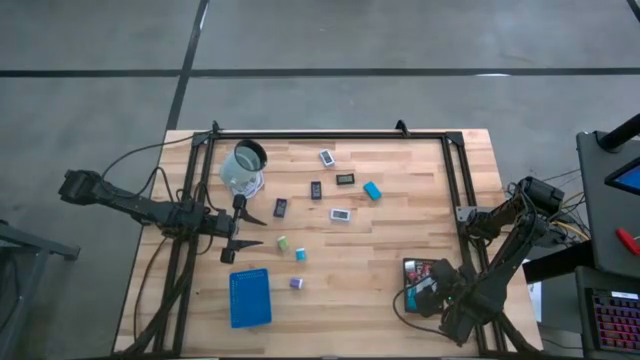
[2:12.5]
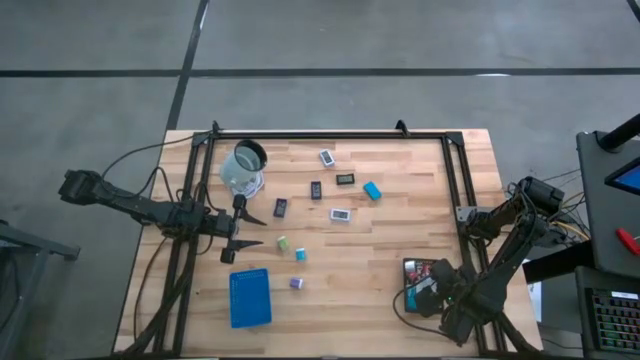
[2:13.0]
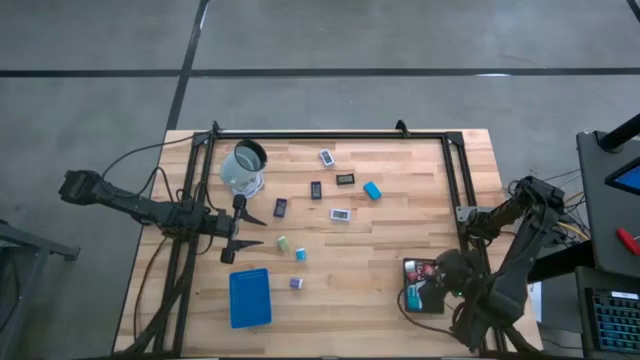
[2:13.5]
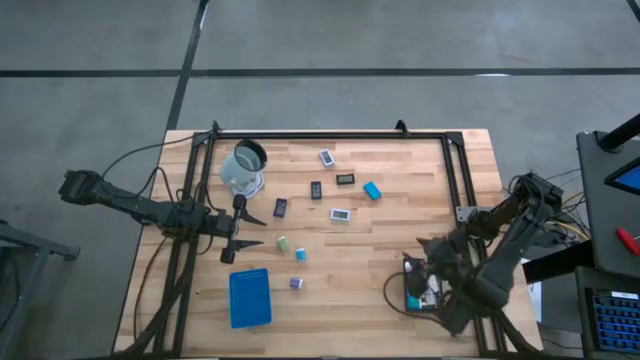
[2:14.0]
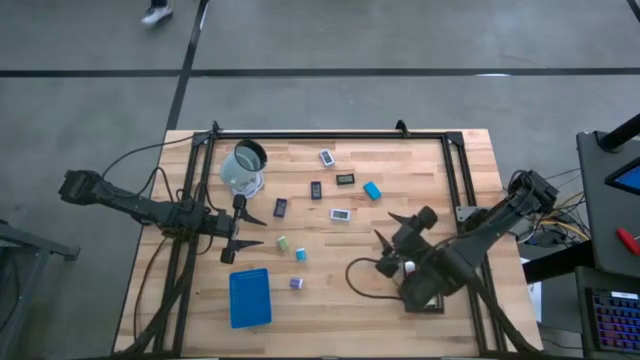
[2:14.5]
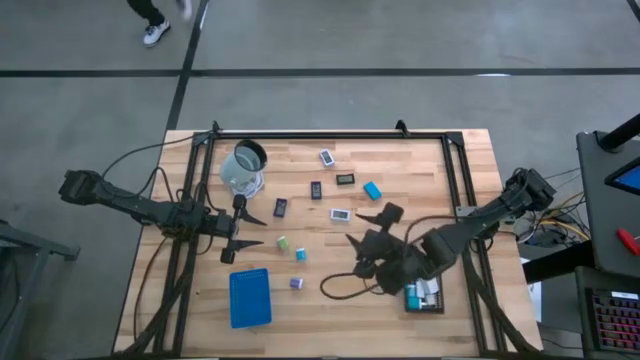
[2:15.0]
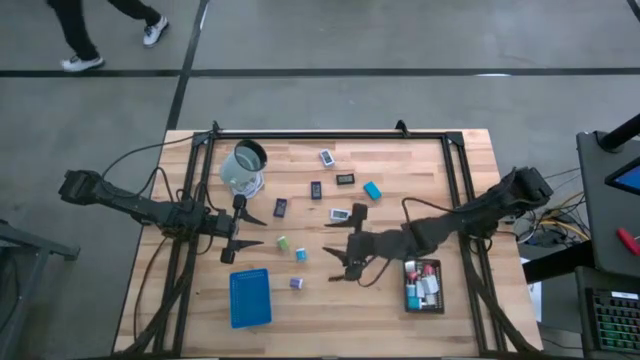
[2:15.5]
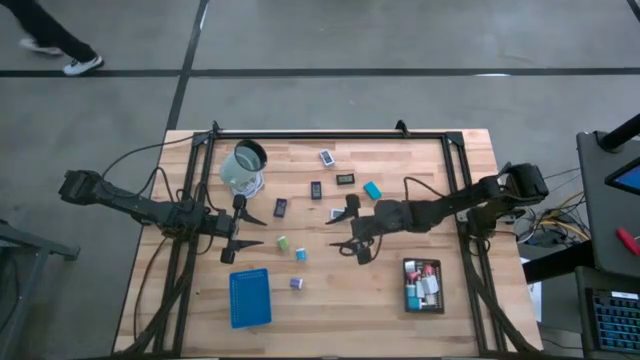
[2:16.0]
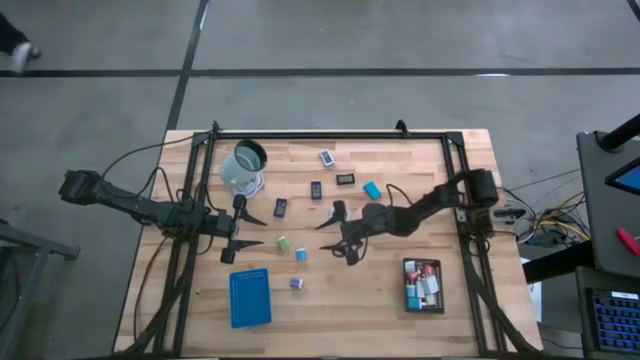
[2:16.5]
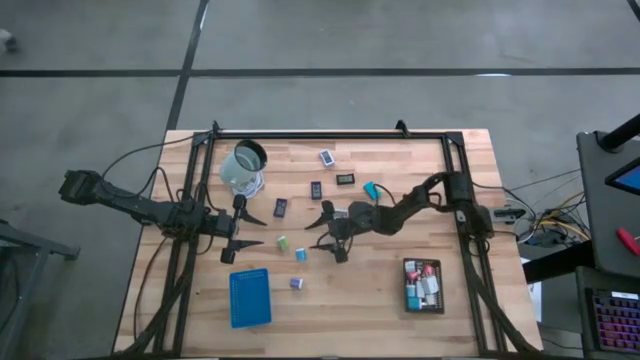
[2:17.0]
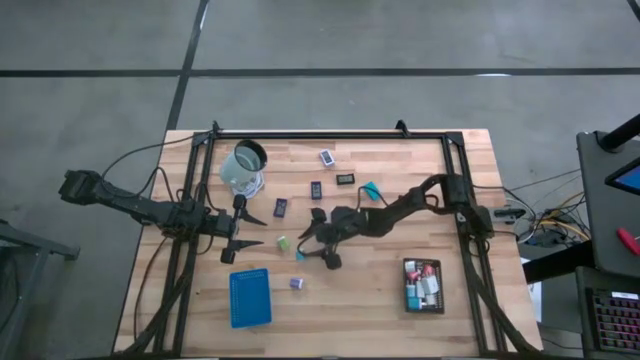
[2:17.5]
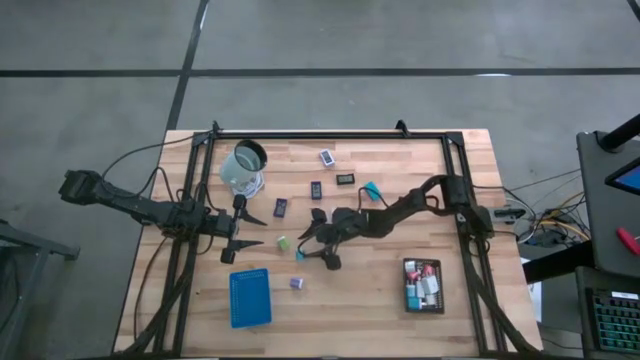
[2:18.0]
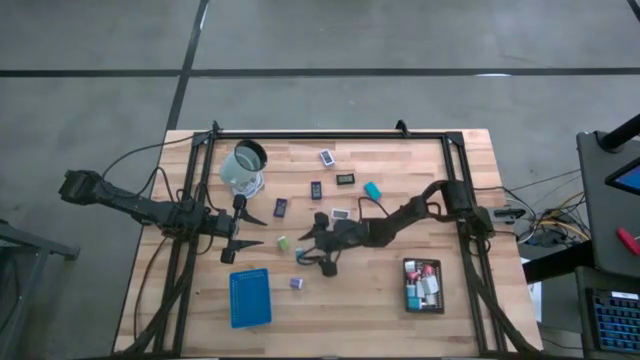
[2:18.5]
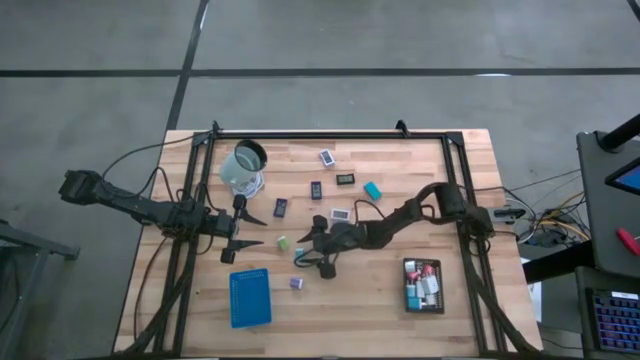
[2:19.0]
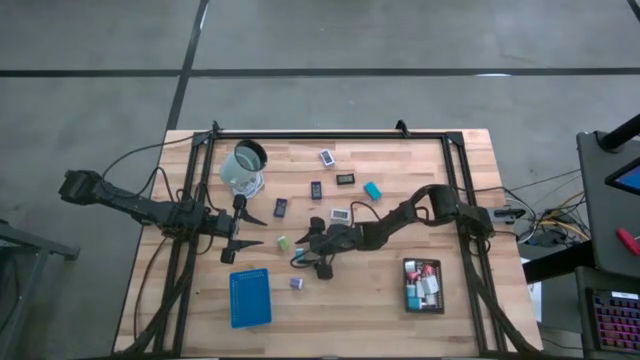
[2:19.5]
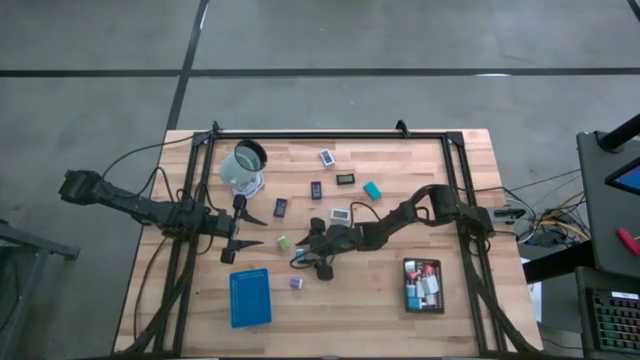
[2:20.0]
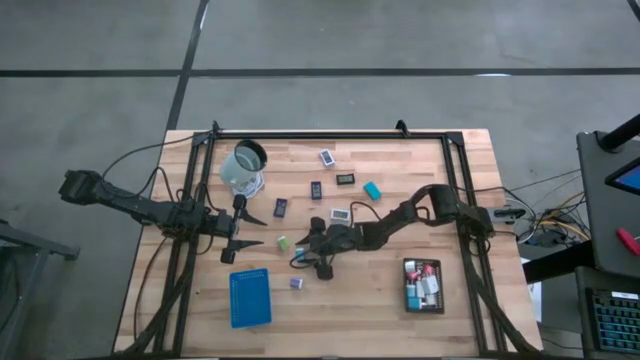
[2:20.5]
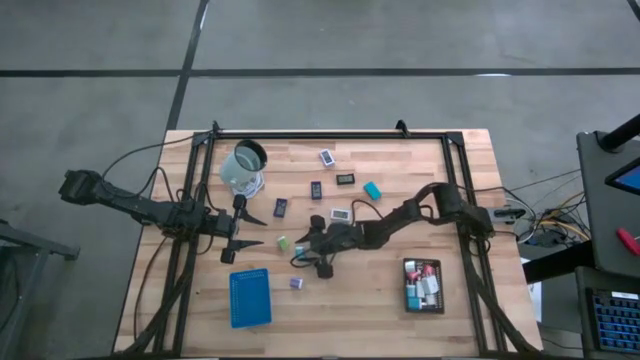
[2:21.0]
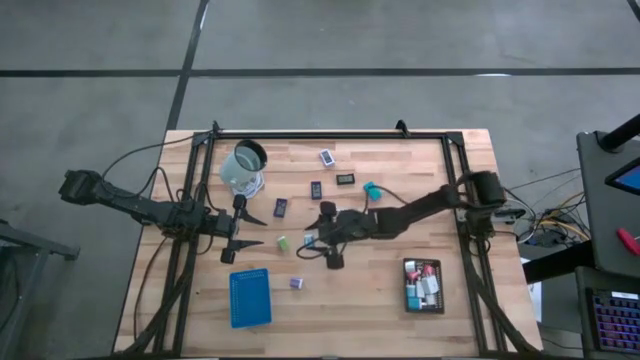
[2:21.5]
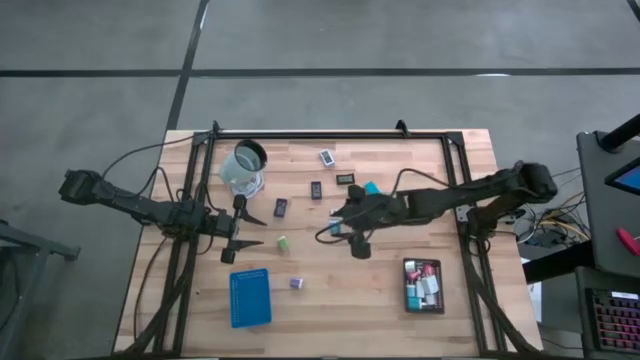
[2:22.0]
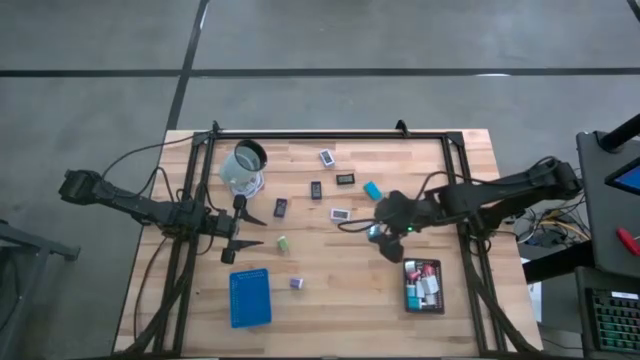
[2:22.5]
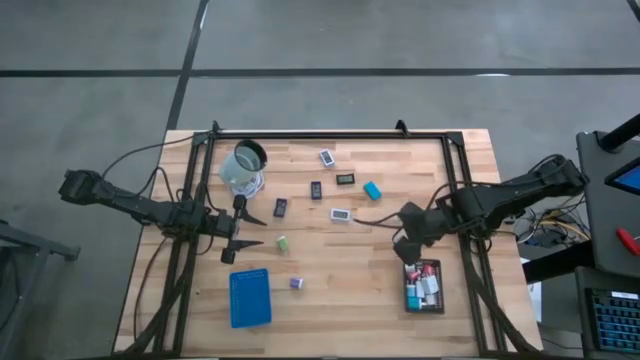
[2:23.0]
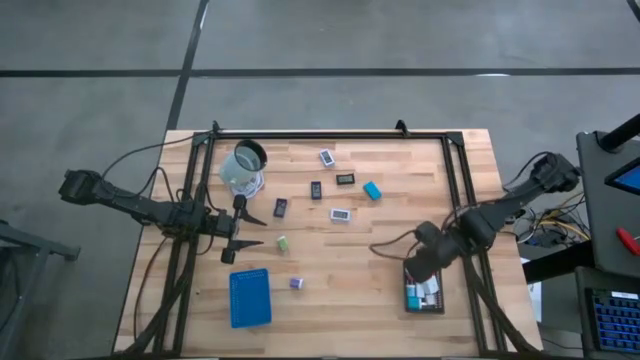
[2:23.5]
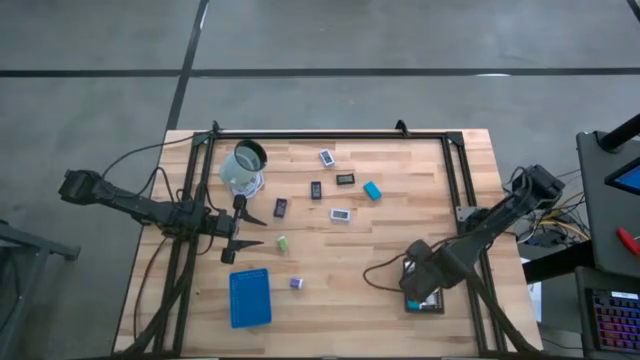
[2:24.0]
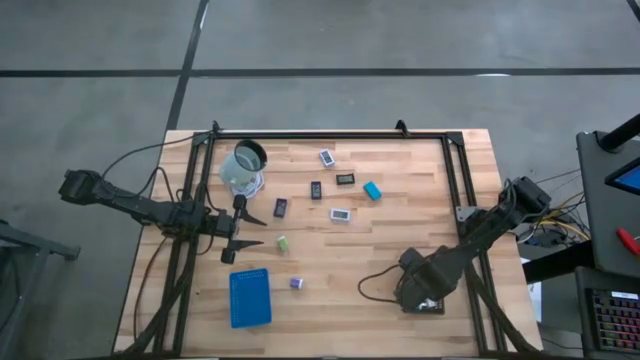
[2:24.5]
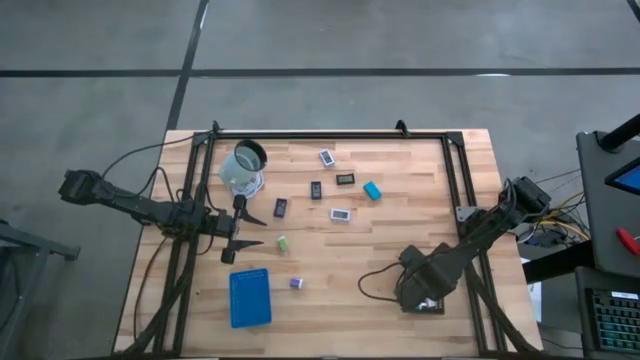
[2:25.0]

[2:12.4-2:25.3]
Task: Pick & Place Office items
Put the light blue charger adapter into the black bin

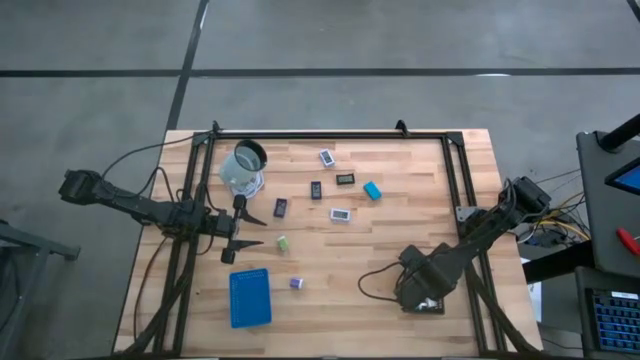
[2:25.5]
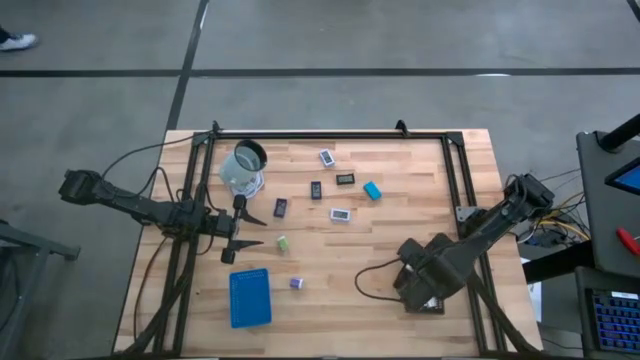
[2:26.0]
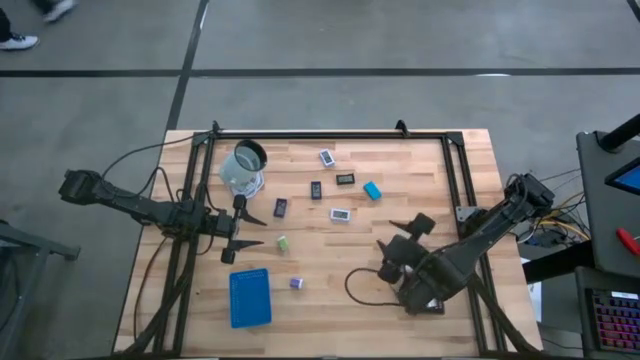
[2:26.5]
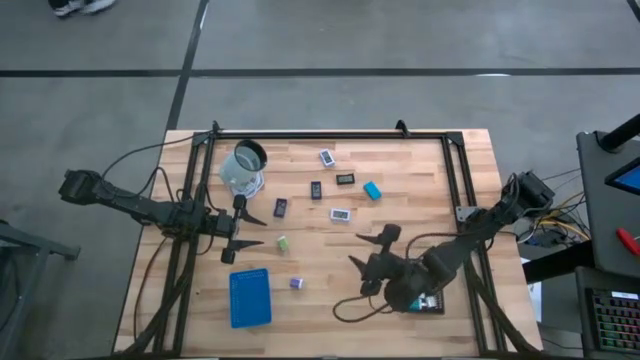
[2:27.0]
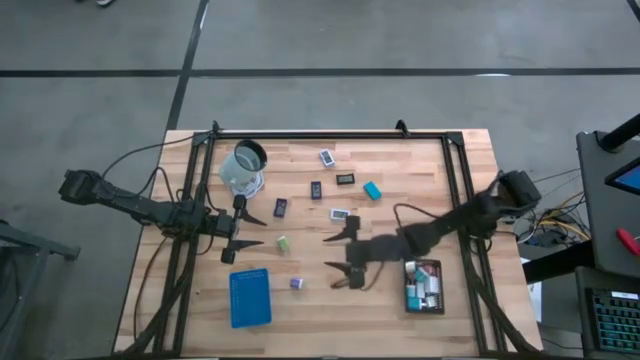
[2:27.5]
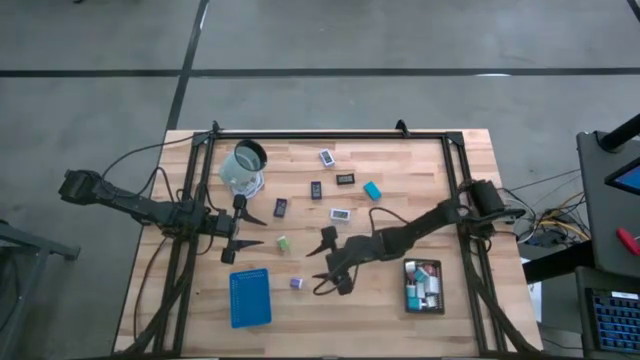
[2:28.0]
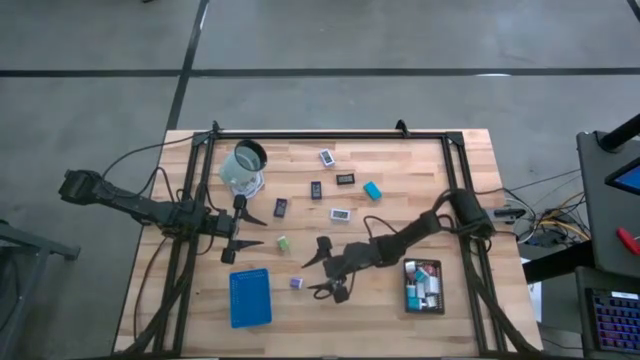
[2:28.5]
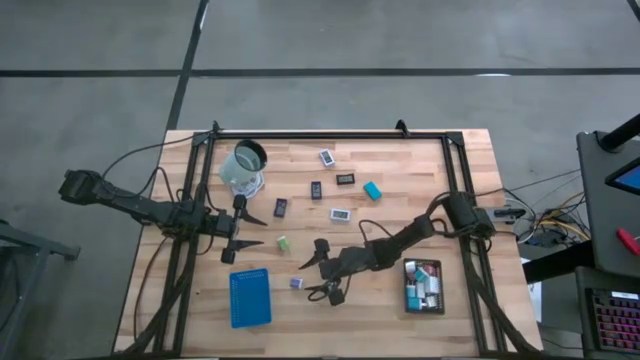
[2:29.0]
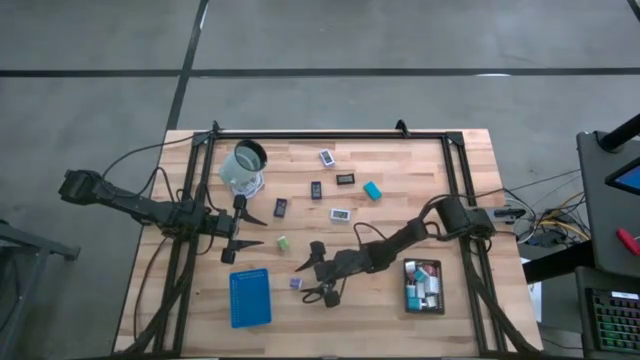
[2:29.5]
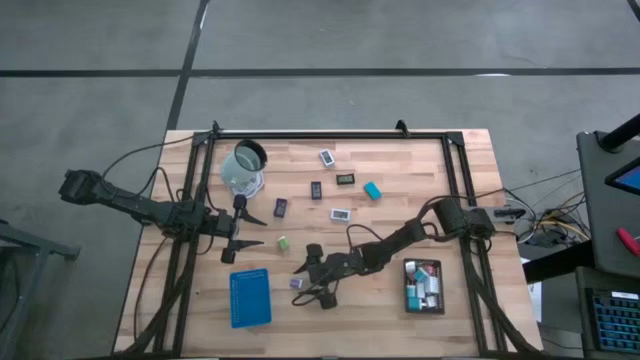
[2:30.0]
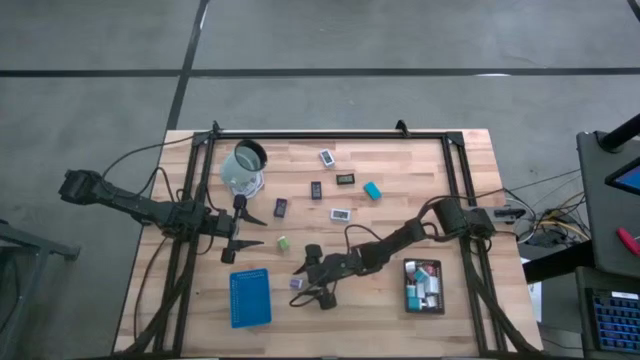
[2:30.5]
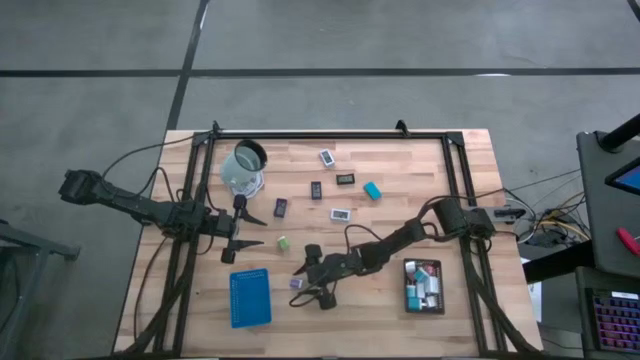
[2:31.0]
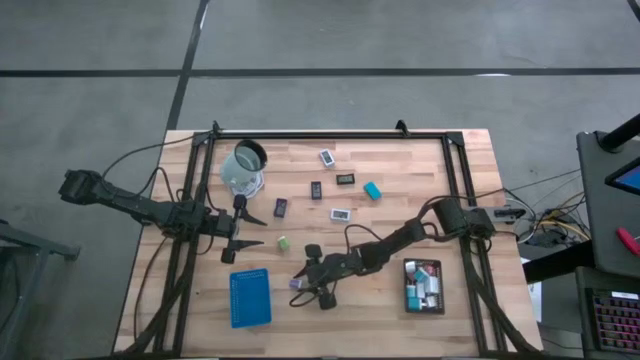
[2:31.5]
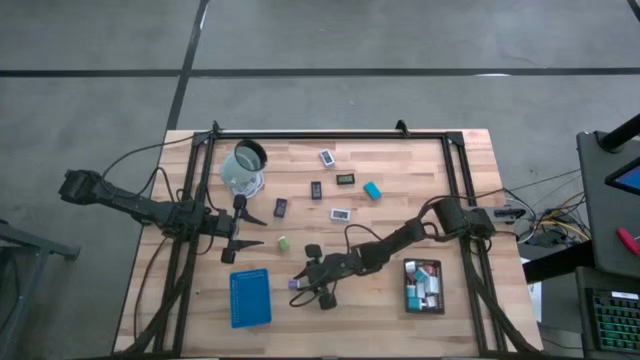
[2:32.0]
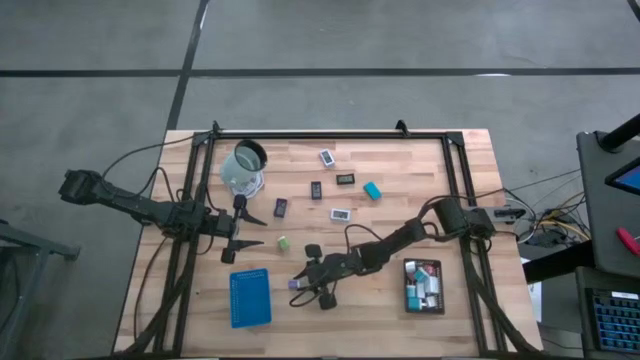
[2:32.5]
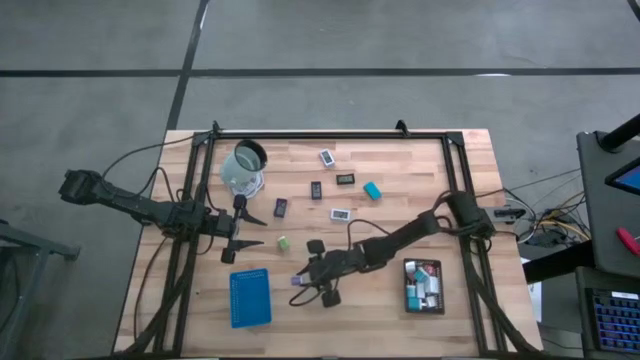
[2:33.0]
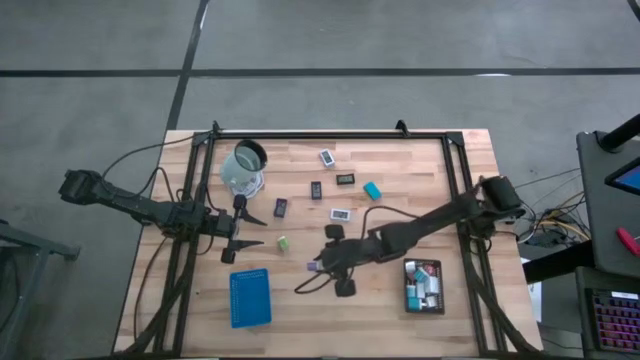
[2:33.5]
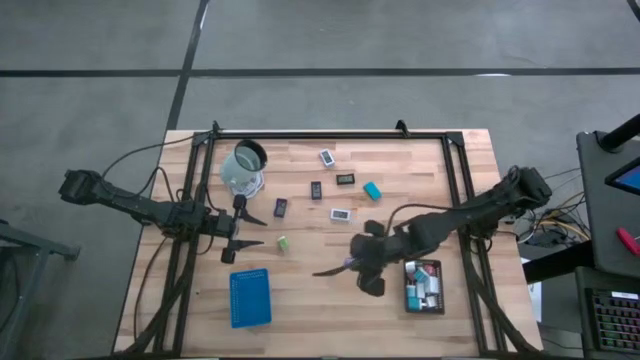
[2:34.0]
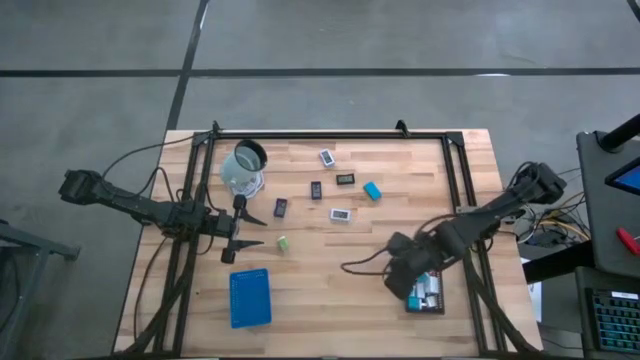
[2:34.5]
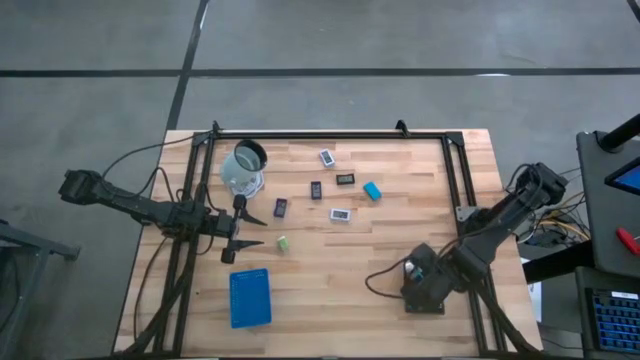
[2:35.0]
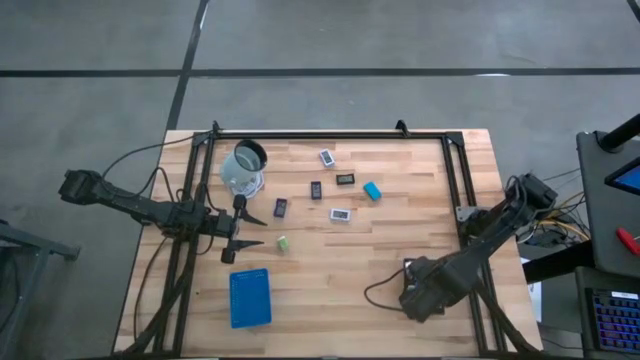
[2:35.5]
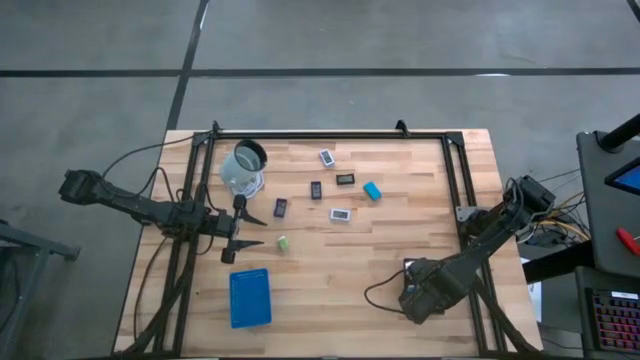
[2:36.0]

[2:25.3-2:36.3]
Put the purple charger adapter into the black bin
